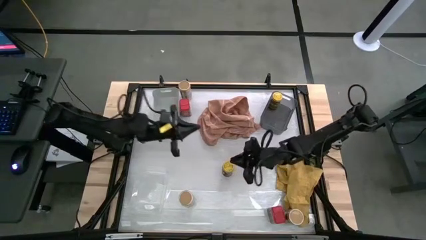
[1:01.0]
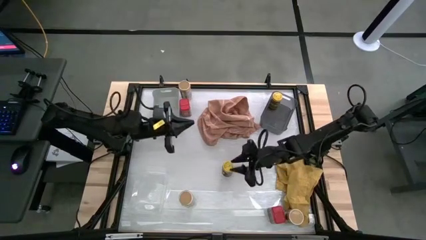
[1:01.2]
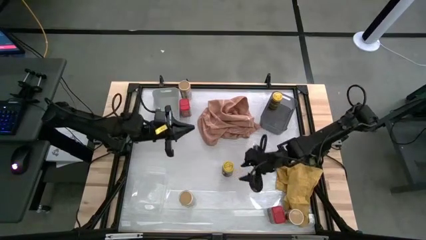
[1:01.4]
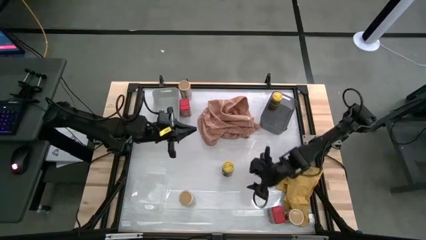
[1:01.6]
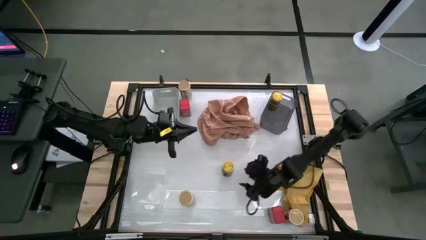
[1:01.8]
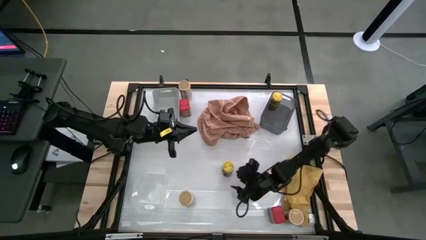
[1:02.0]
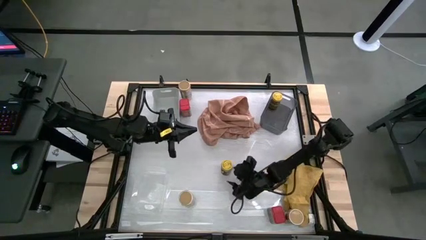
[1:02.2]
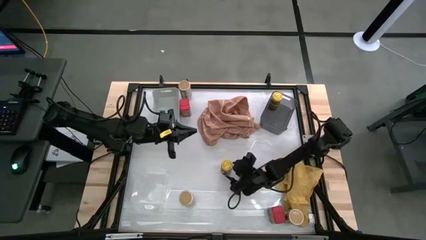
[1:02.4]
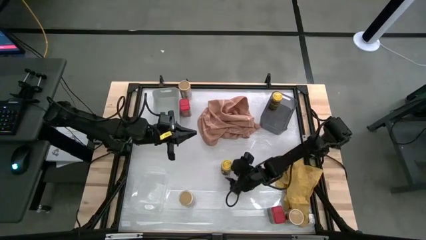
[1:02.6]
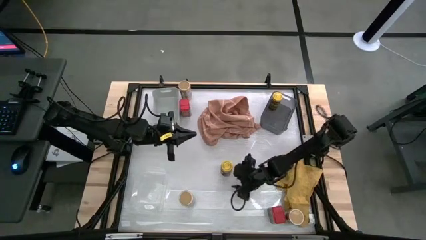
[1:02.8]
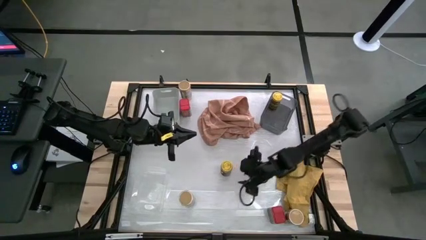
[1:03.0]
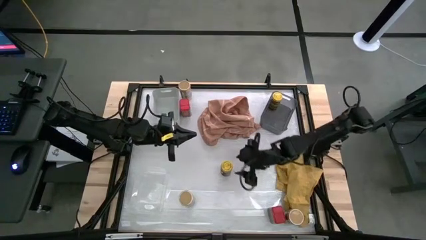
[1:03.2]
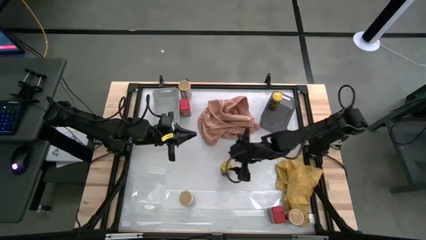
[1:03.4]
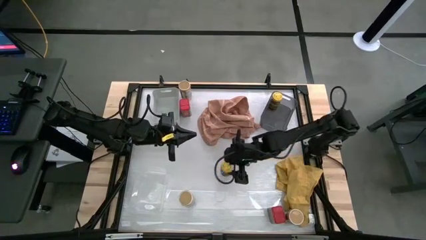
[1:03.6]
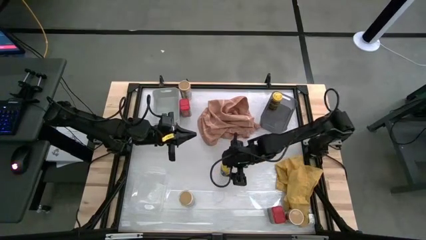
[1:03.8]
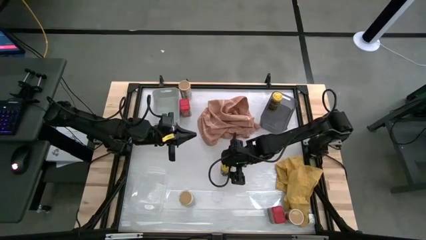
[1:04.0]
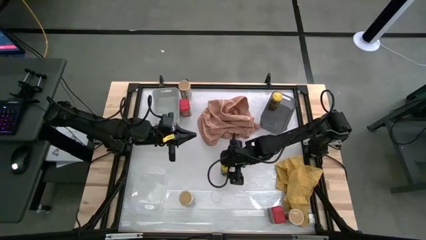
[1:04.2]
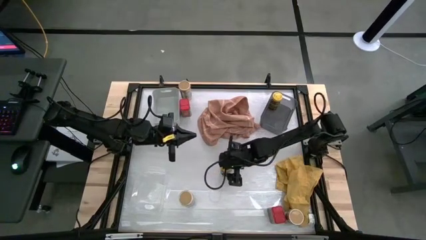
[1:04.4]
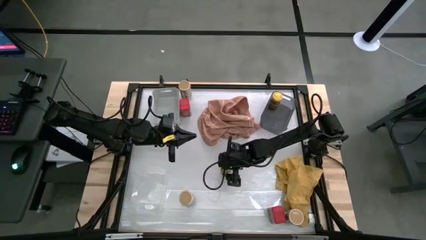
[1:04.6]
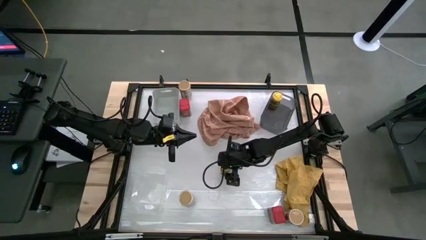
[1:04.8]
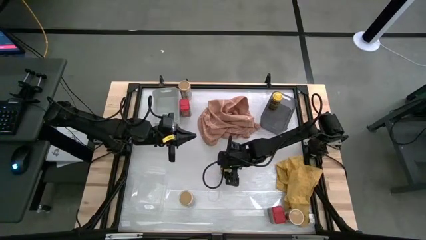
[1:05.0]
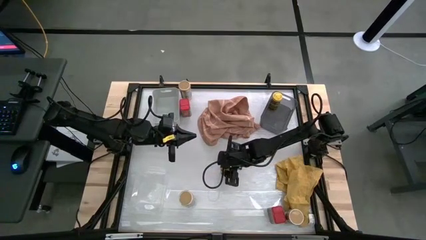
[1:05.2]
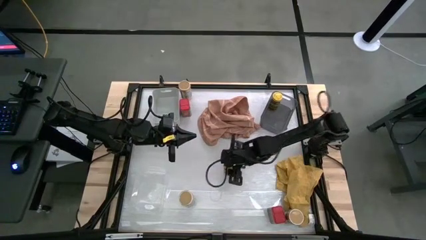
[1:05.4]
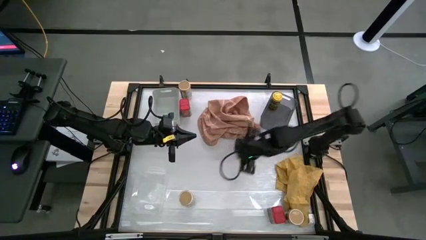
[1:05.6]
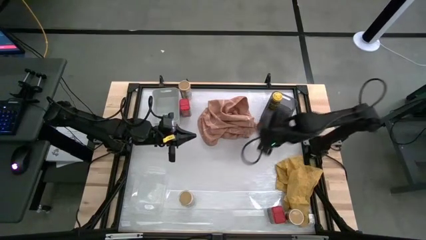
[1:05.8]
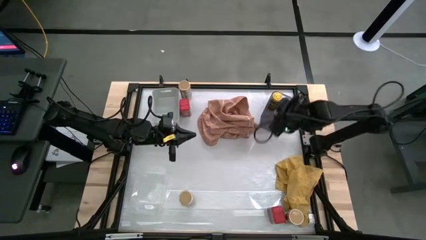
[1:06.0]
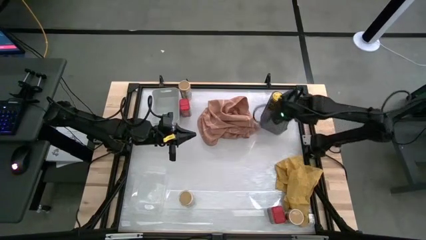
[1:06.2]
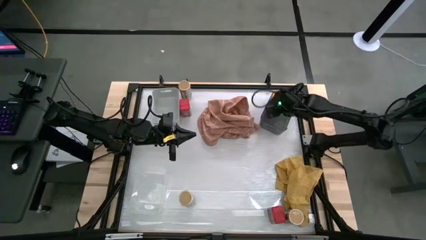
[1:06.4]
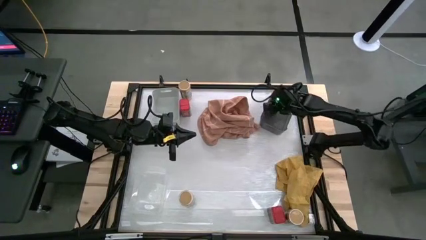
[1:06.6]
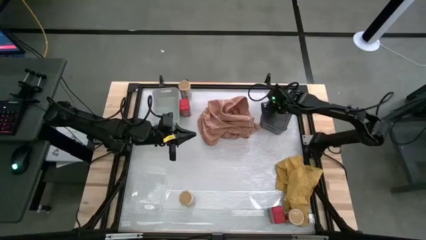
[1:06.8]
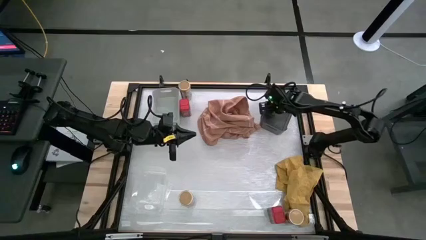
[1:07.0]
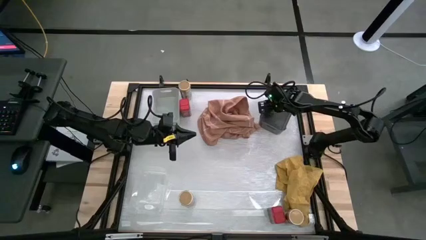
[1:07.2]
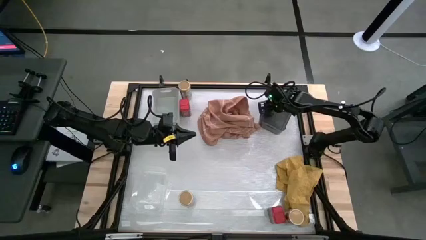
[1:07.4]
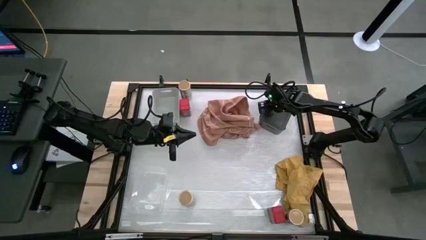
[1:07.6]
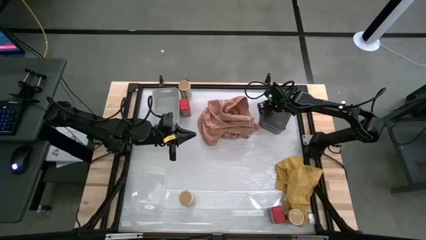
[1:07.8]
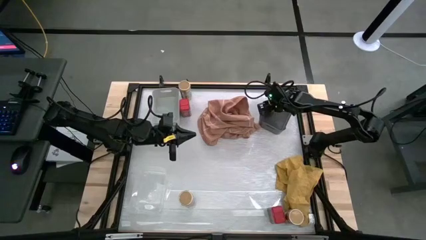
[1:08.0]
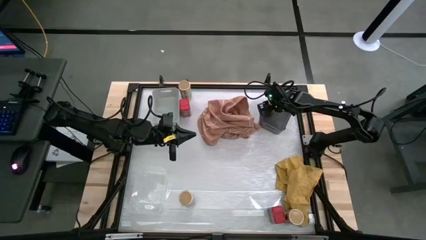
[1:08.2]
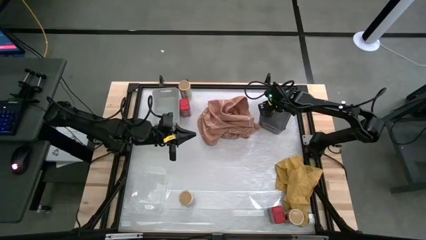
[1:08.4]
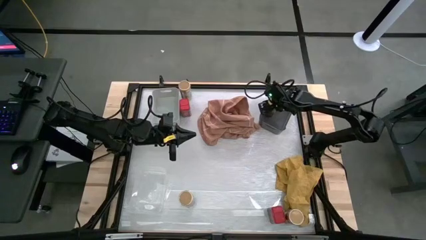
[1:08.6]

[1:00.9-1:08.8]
Task: Sort spices by type
Put the yellow seasoning bottle into the black bin

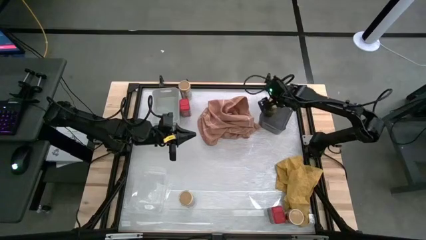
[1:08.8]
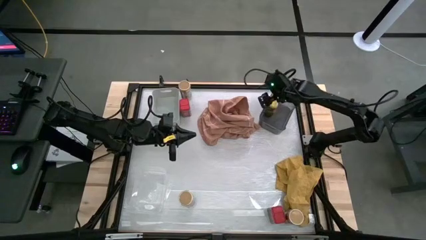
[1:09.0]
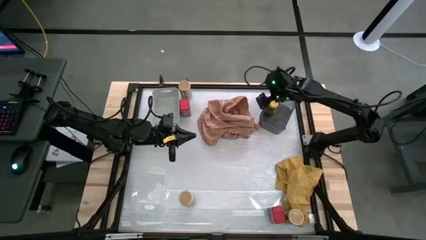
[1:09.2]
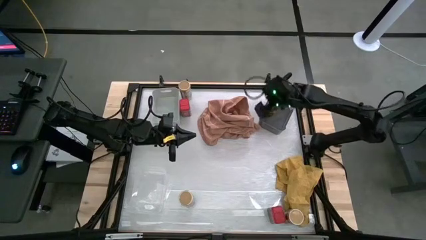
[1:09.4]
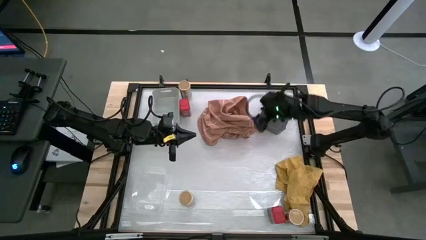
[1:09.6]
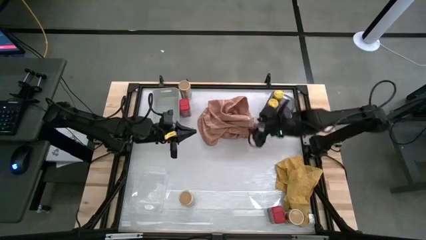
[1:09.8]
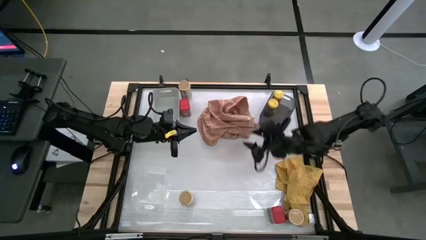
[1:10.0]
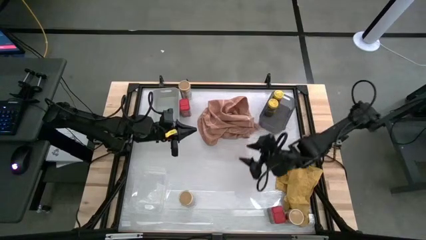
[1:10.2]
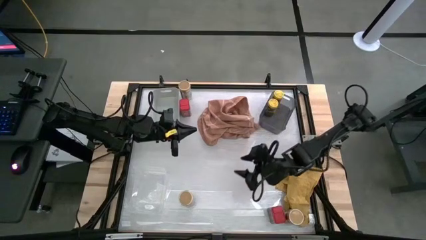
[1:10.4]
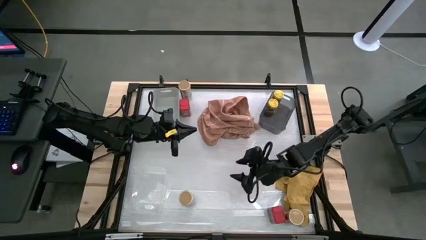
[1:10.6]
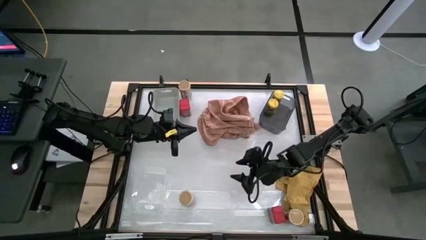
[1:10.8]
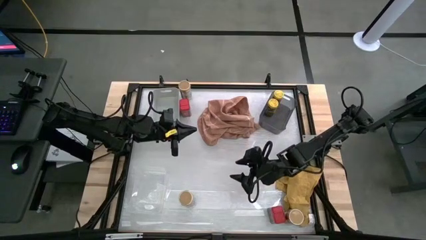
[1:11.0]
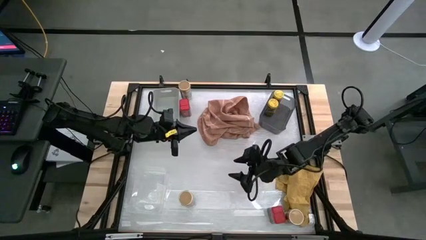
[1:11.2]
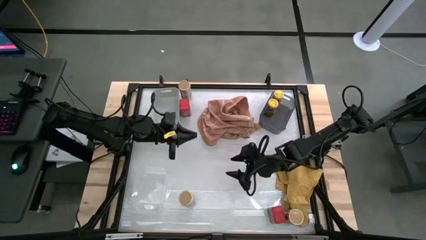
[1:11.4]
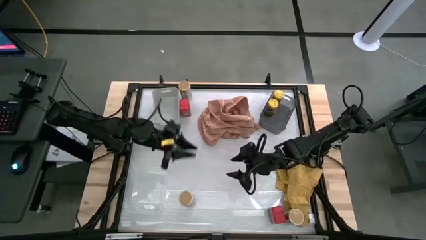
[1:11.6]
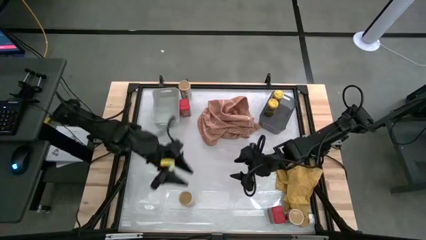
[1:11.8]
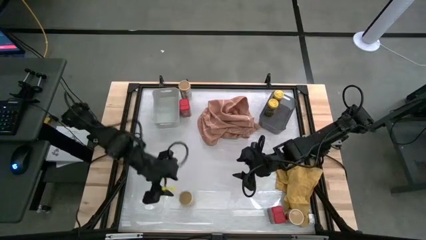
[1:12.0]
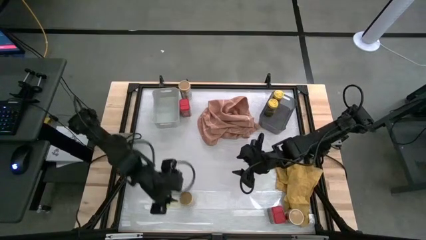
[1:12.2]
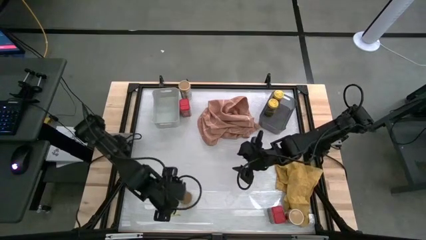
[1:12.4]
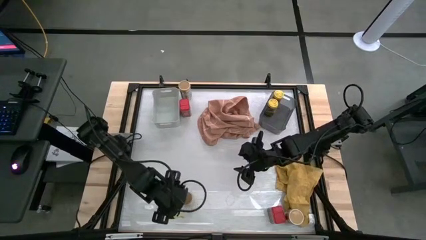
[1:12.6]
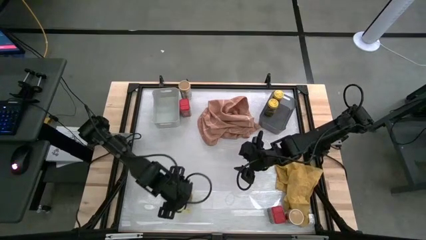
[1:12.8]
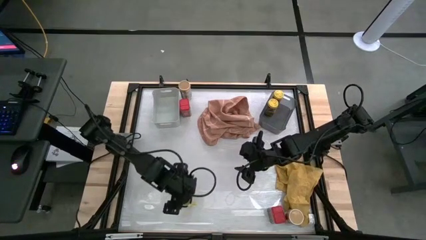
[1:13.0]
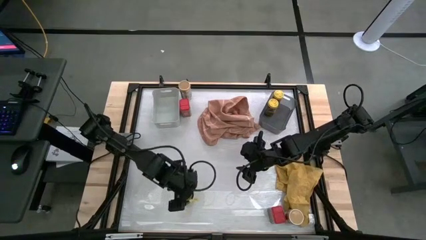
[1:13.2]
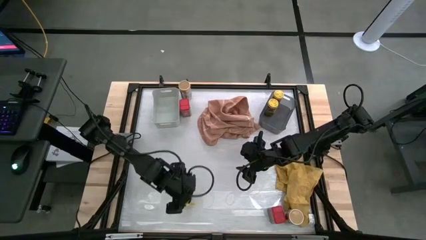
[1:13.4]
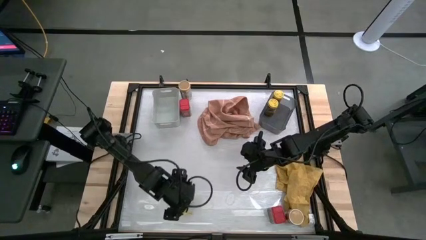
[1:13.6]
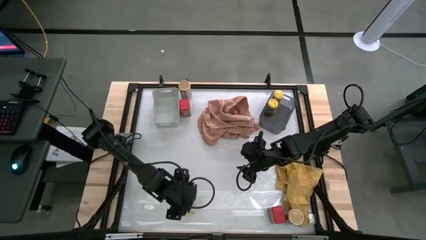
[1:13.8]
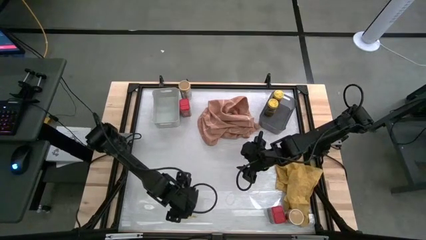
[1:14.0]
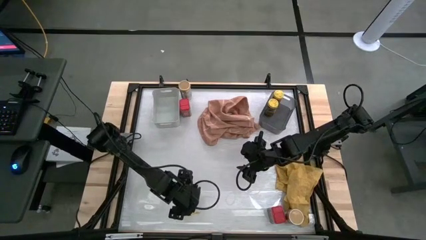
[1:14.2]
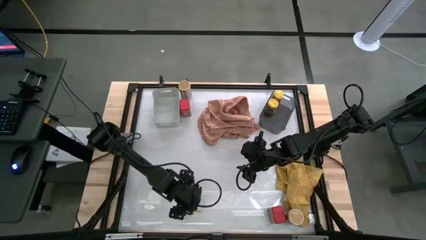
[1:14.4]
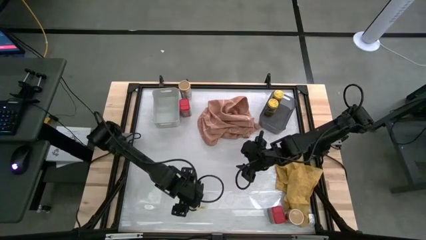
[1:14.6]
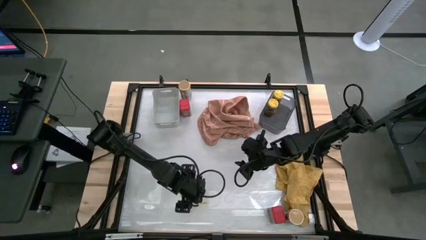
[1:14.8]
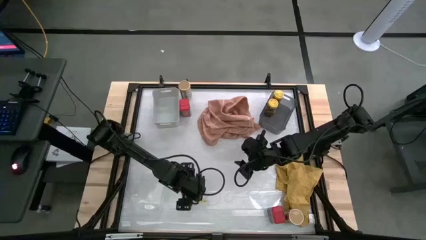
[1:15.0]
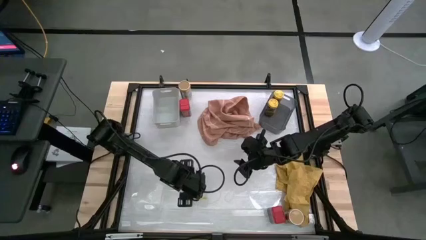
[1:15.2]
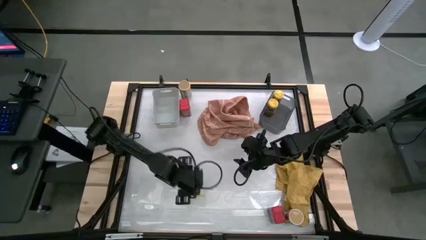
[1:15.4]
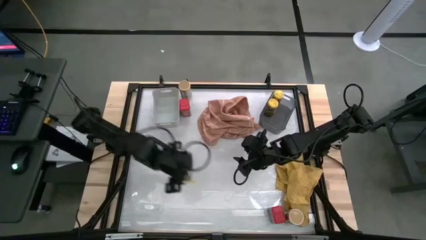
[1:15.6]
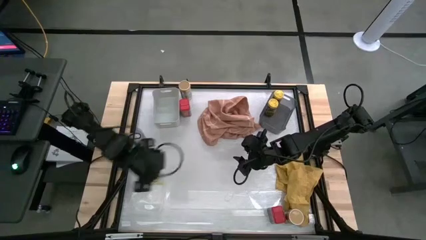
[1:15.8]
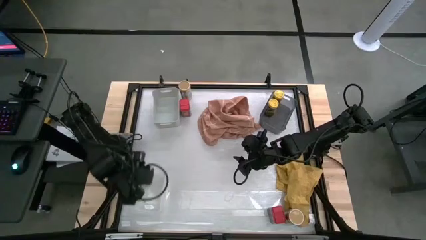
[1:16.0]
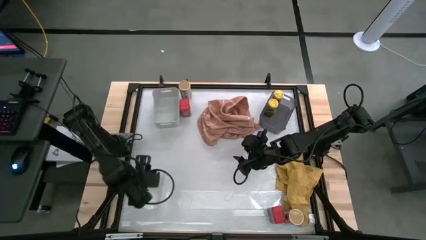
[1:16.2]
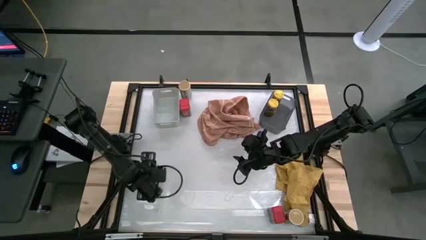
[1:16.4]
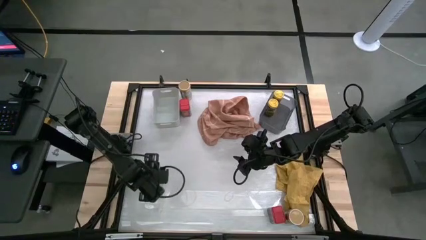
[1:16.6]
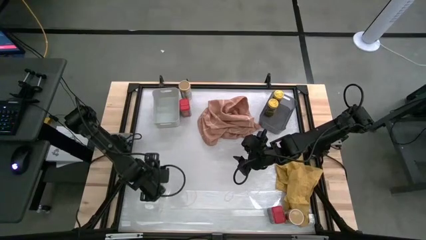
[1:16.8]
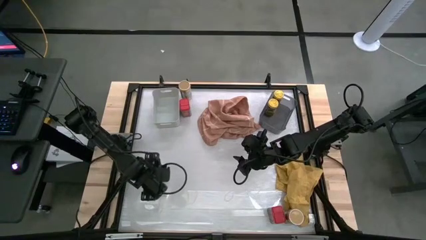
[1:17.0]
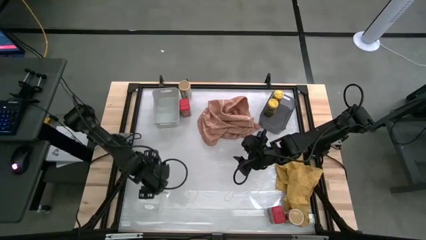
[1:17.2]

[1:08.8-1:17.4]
Put the bottom left gold seasoning bottle into the transparent bin

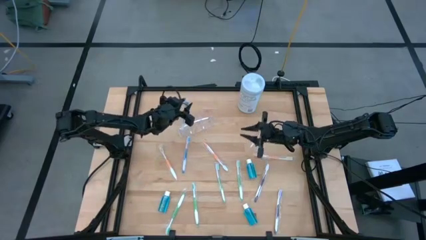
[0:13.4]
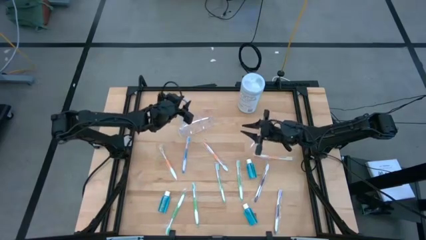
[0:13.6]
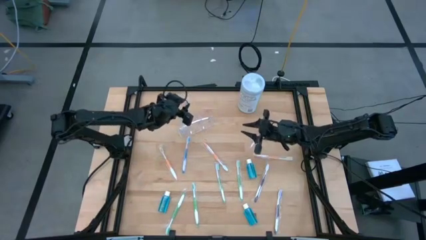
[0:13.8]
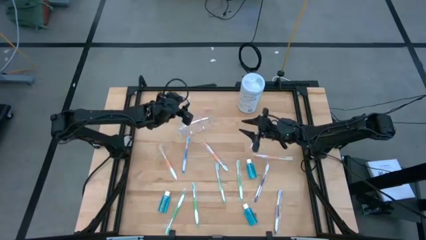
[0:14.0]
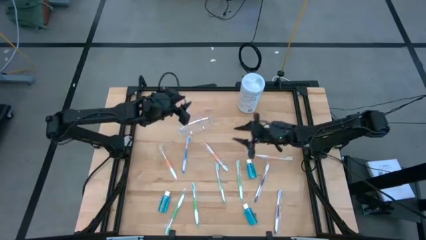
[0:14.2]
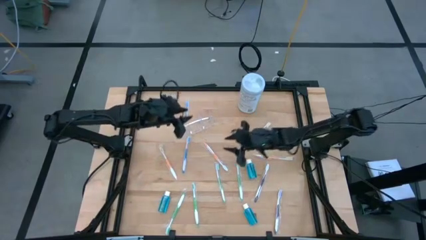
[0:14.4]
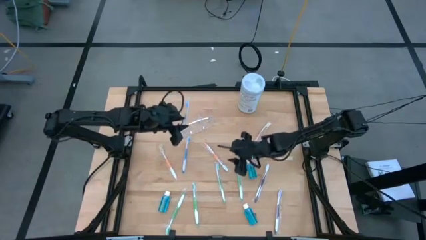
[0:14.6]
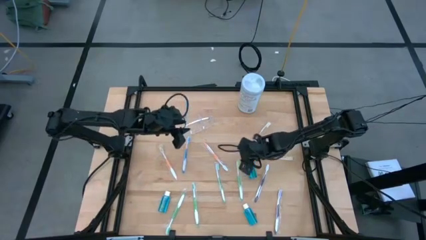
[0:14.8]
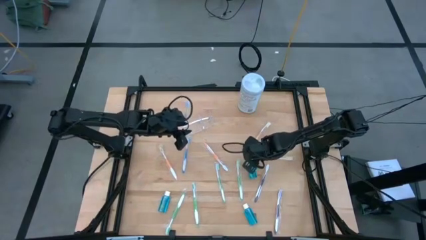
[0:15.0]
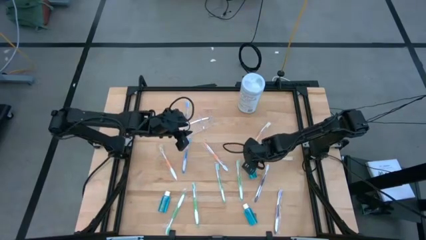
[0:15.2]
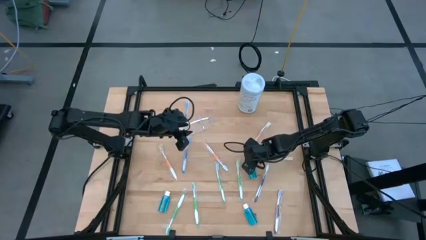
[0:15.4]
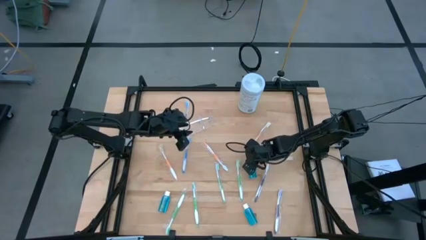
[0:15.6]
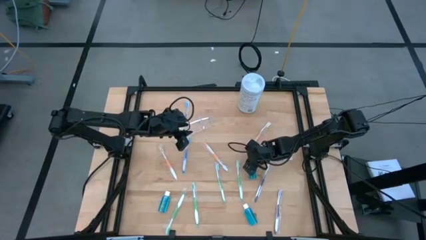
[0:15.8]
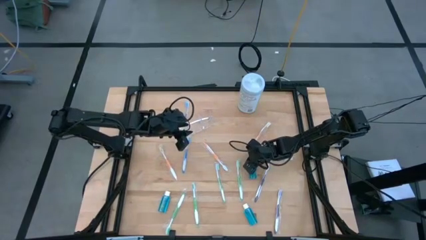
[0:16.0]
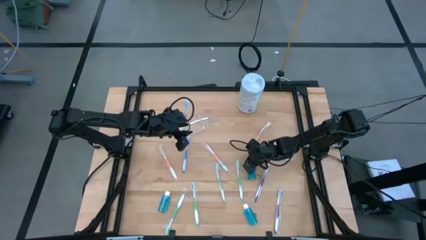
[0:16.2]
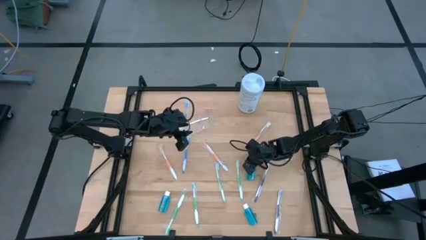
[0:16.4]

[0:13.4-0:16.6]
Task: Pick & Place toothbrushing station
Put the blue mouthwash into the transparent organizer
